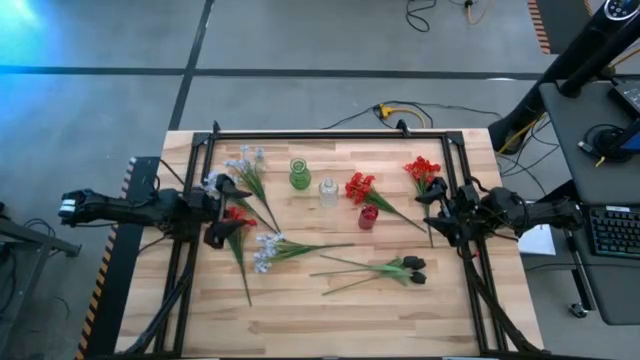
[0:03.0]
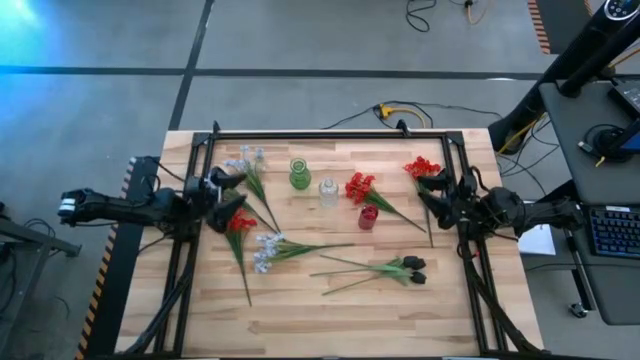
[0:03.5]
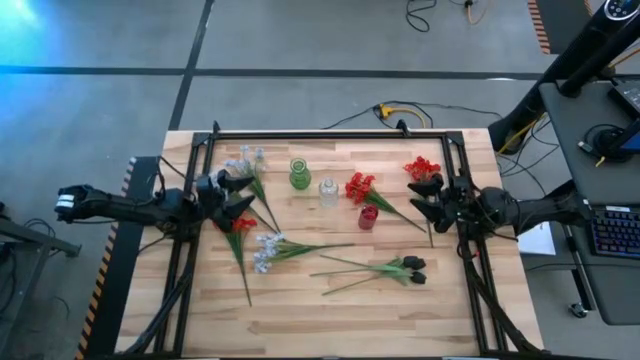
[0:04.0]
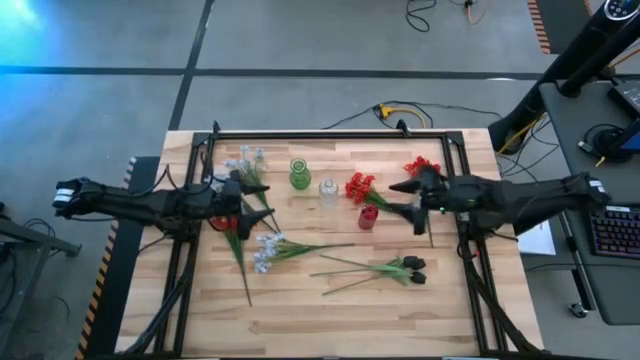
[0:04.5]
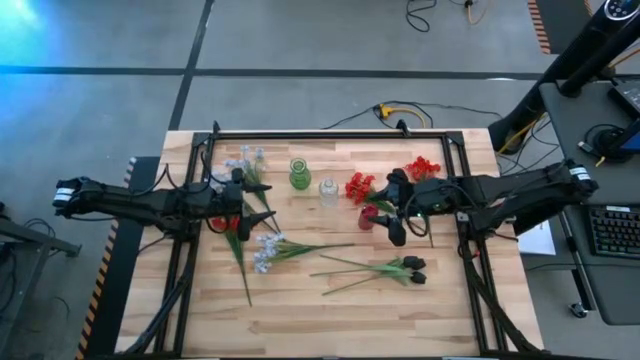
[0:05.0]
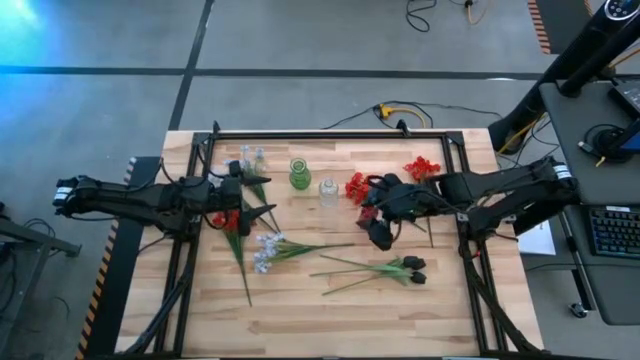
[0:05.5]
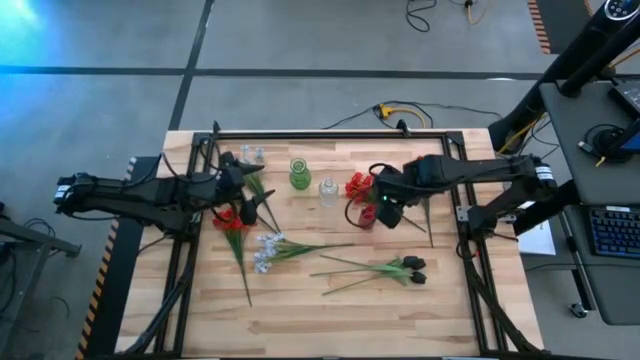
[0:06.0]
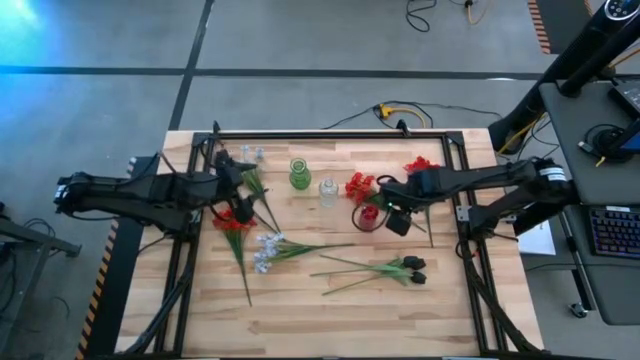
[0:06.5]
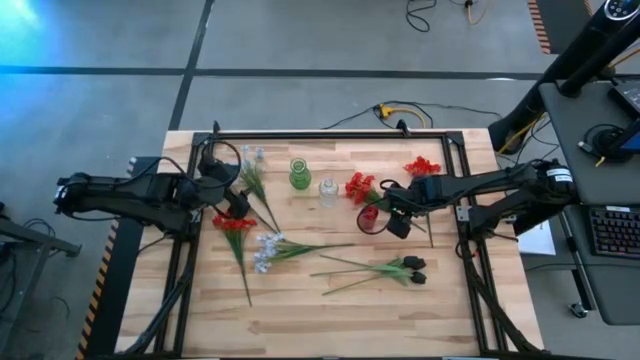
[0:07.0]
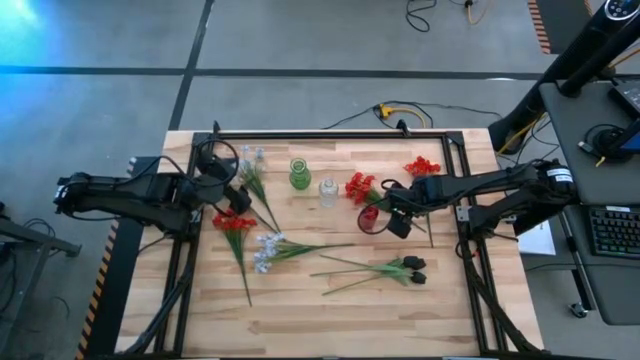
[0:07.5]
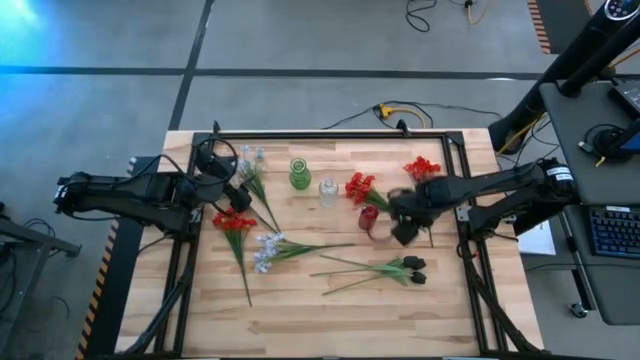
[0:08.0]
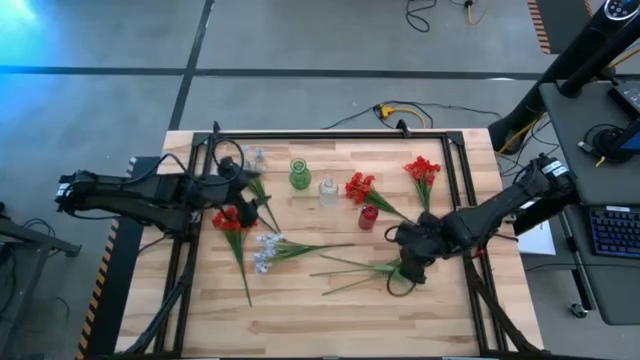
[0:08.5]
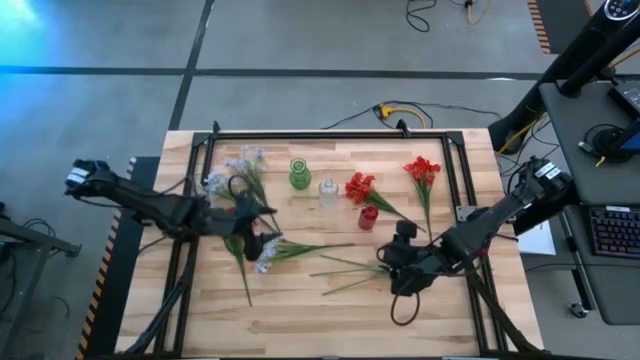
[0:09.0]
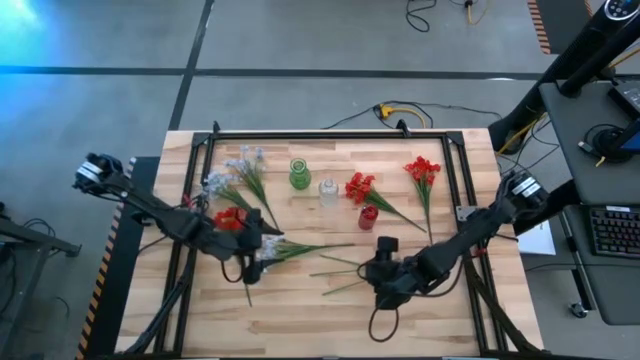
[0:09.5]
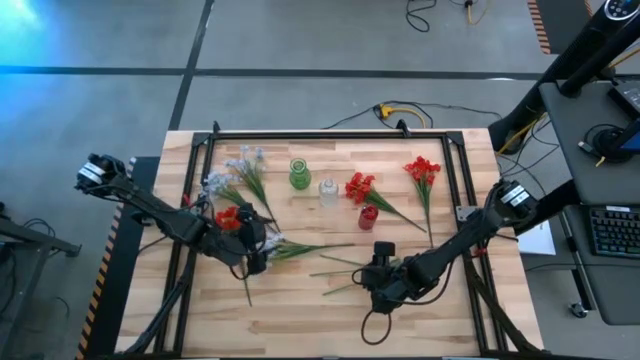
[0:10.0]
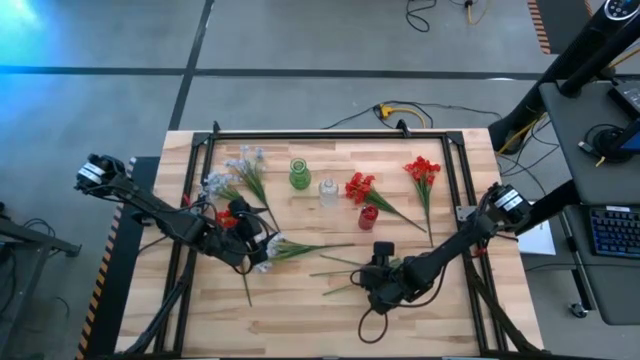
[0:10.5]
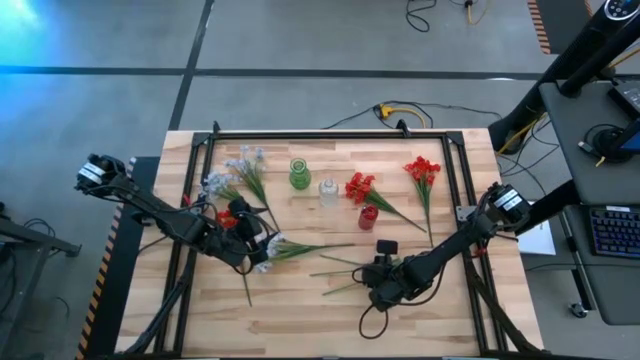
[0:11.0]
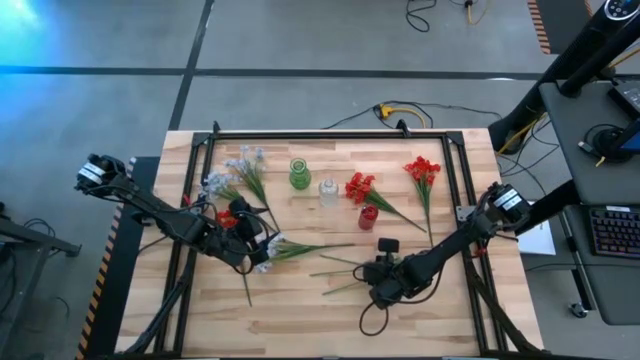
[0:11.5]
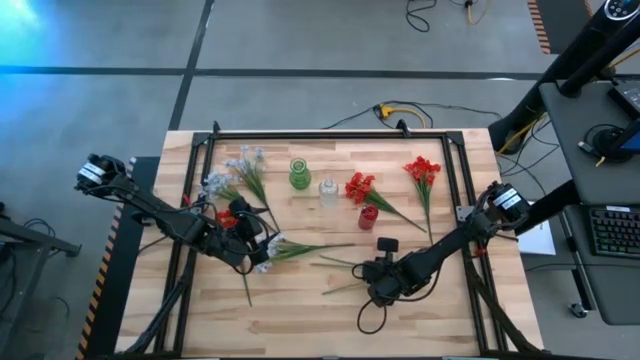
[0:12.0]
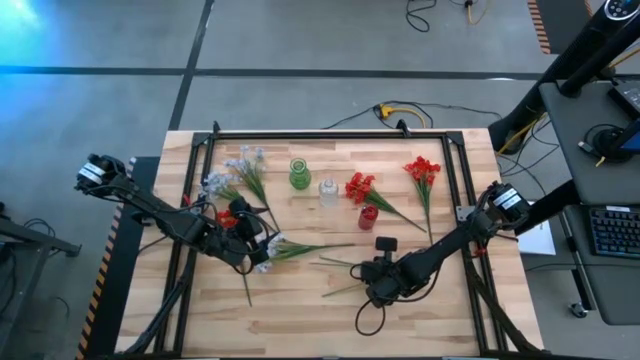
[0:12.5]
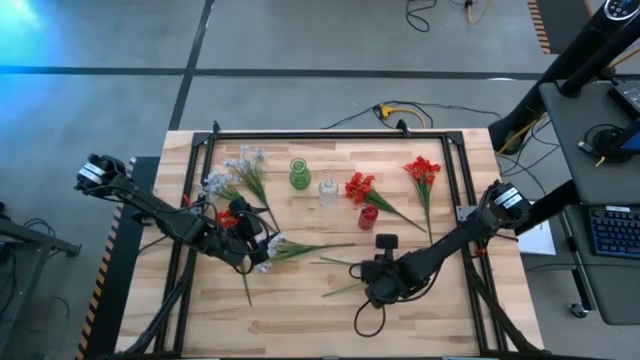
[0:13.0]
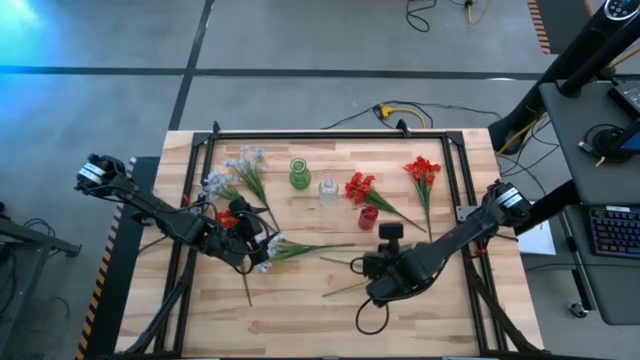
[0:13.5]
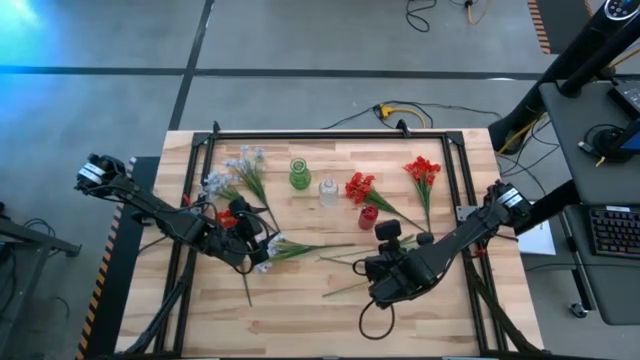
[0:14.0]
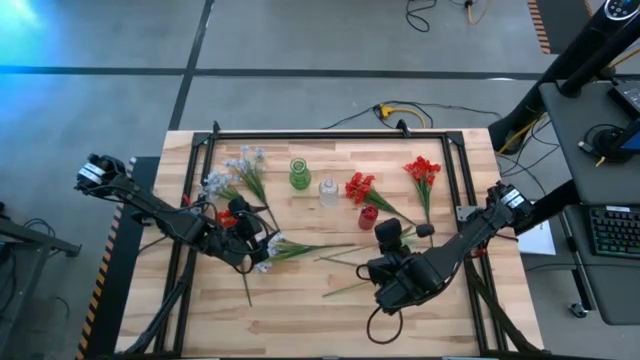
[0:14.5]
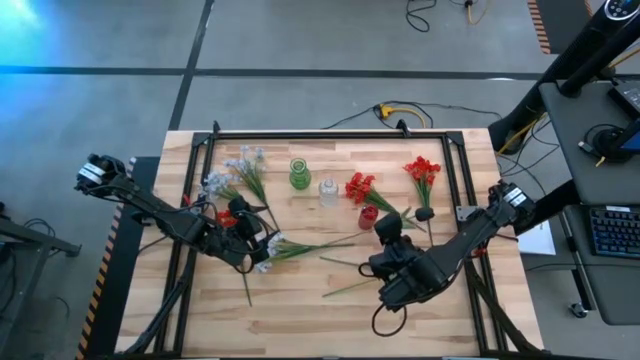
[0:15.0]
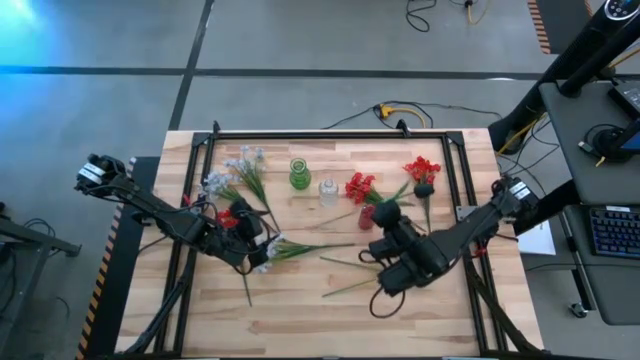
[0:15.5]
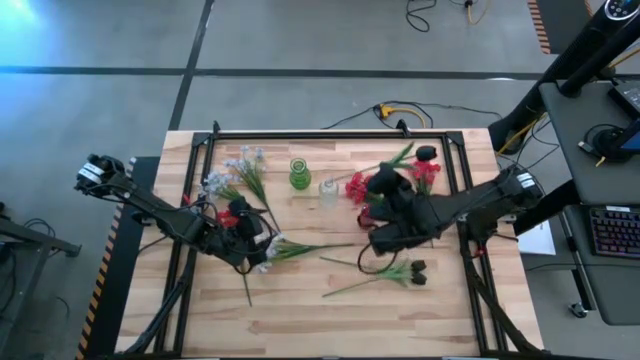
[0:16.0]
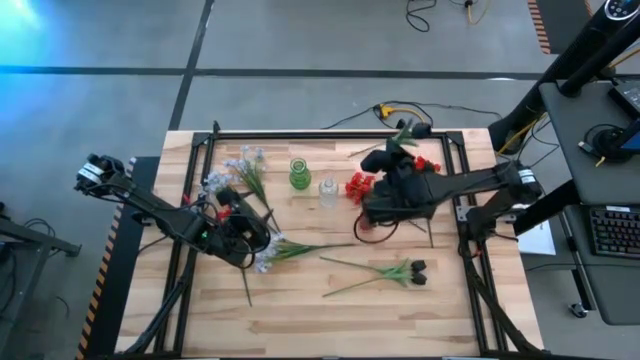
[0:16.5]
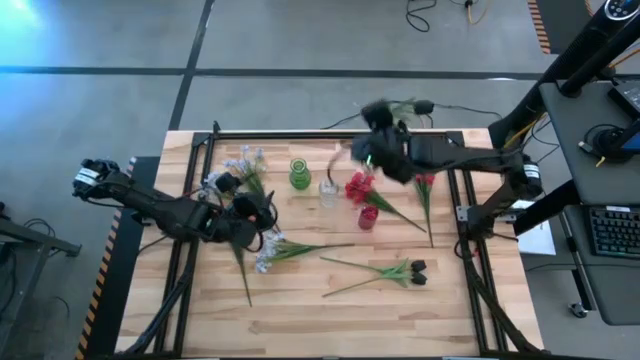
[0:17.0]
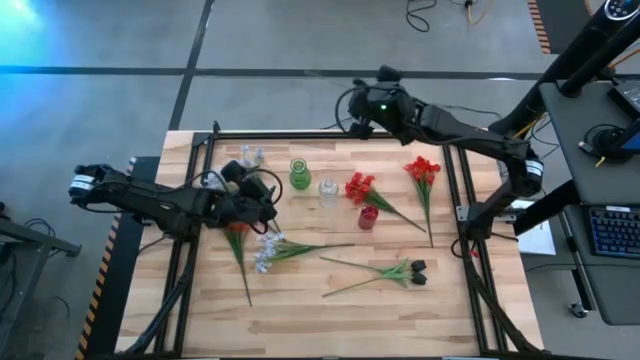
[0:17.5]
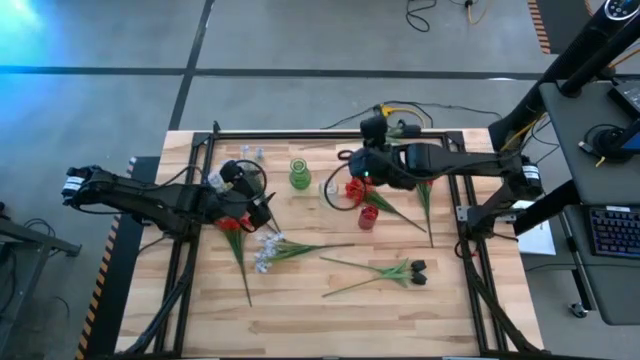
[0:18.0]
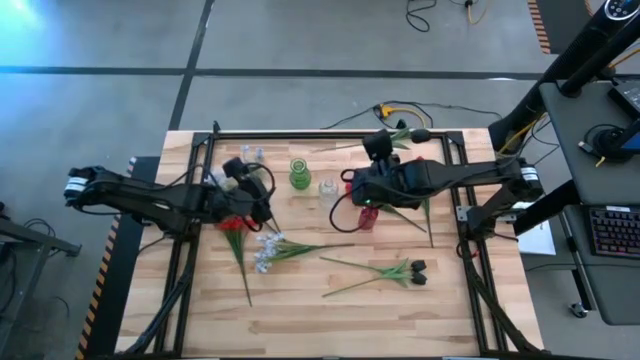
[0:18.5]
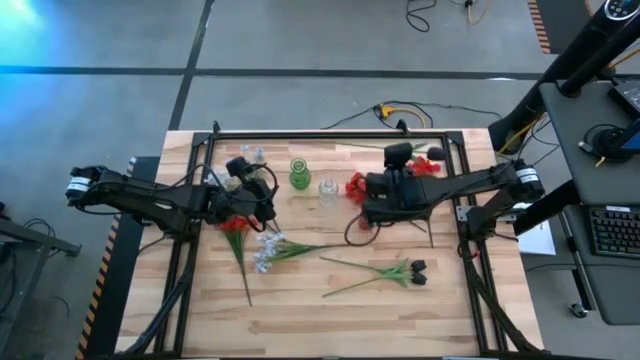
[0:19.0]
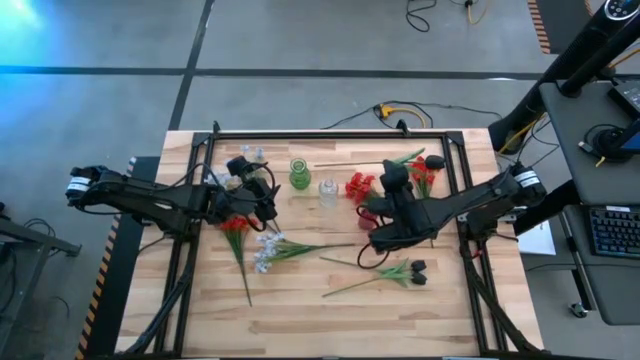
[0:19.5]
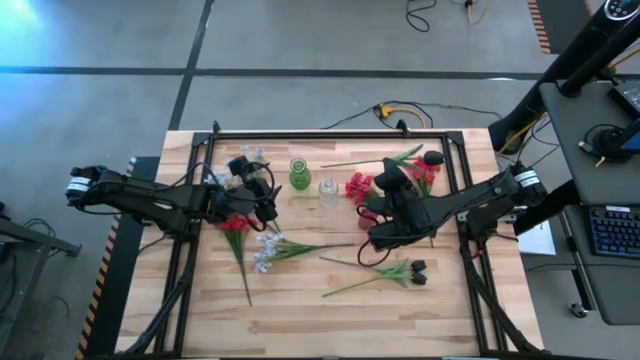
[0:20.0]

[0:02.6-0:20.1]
Task: Sort flowers into vase by color
Put the center black tulip into the green vase
